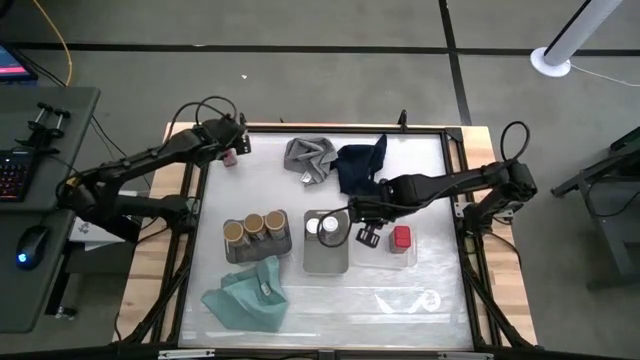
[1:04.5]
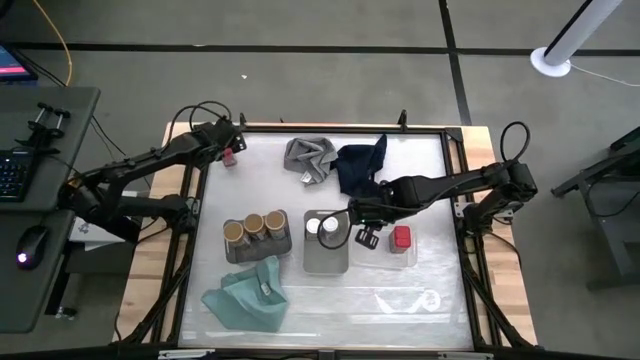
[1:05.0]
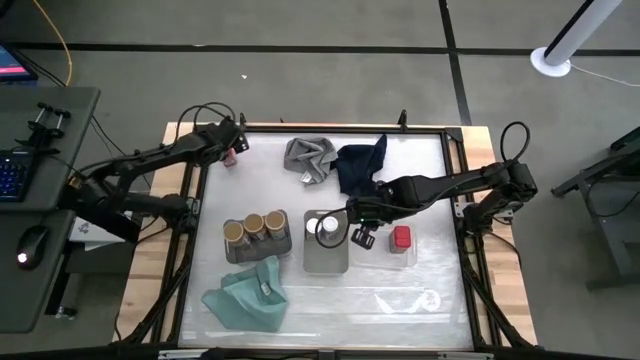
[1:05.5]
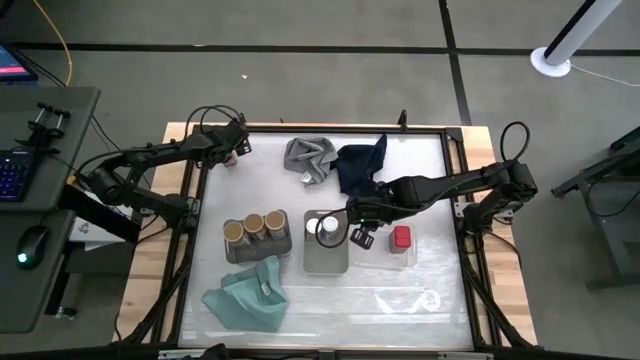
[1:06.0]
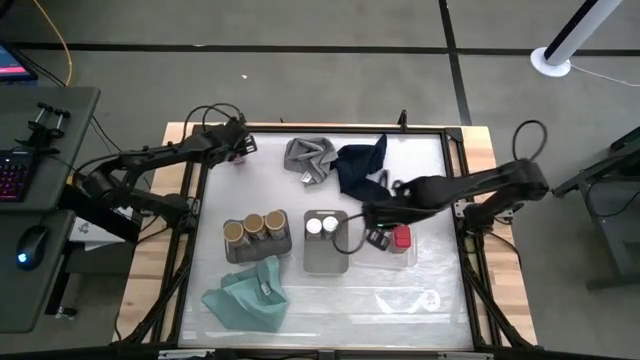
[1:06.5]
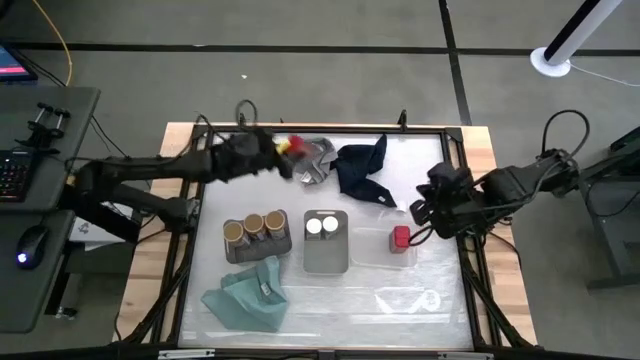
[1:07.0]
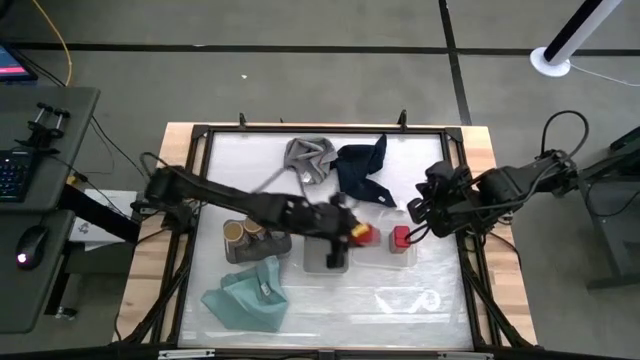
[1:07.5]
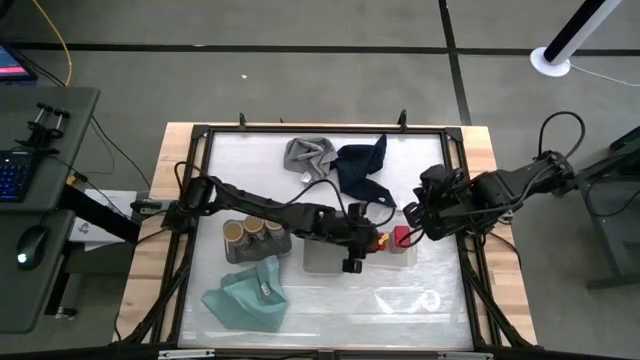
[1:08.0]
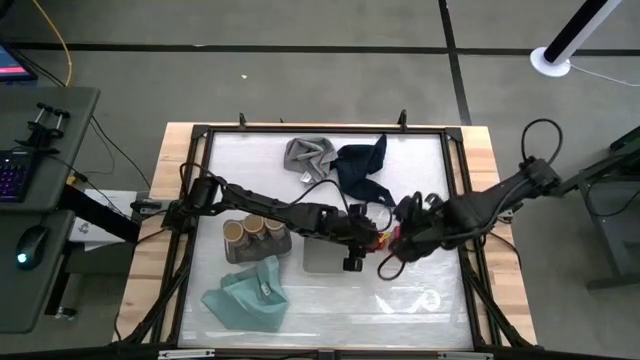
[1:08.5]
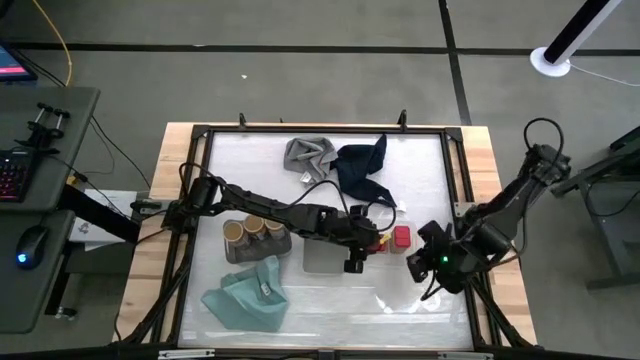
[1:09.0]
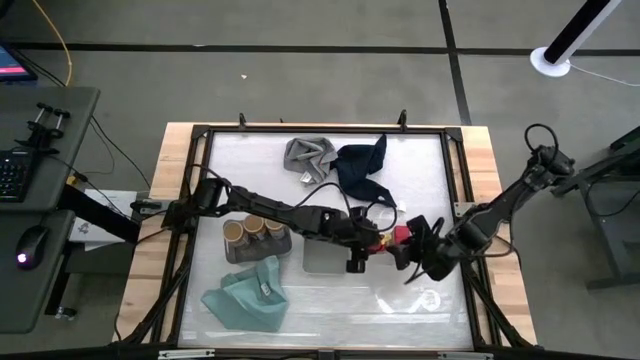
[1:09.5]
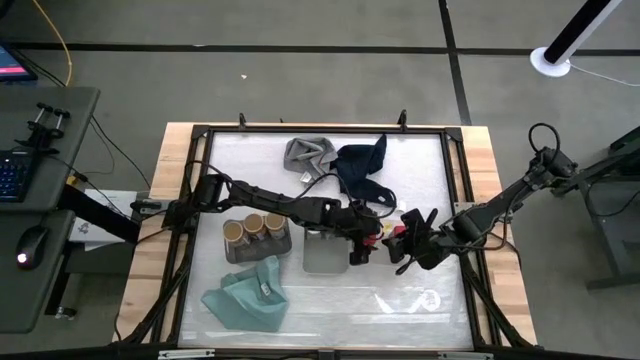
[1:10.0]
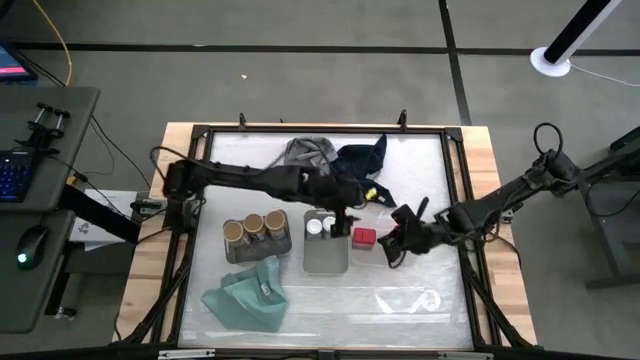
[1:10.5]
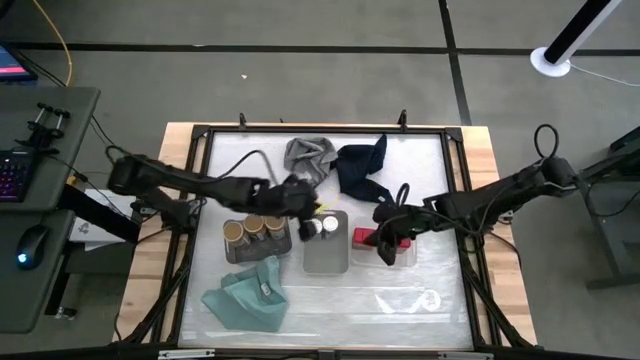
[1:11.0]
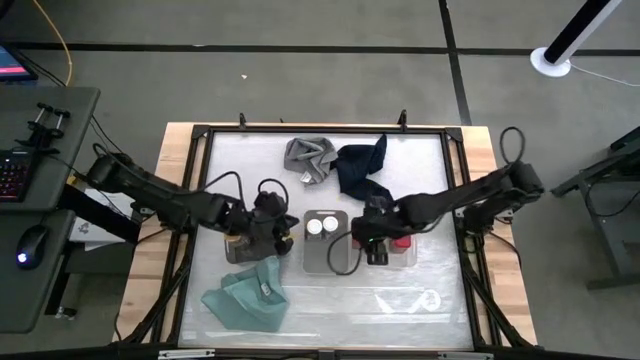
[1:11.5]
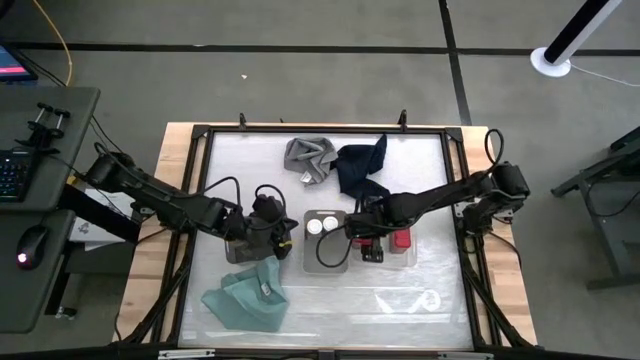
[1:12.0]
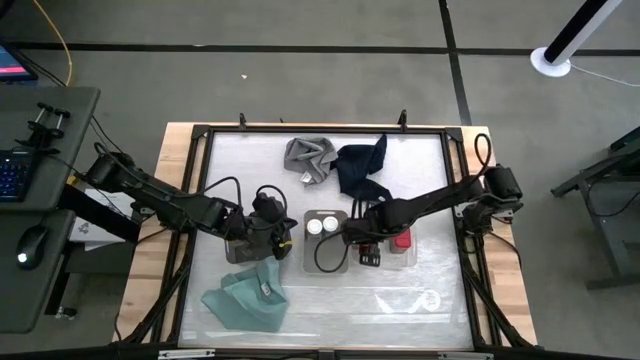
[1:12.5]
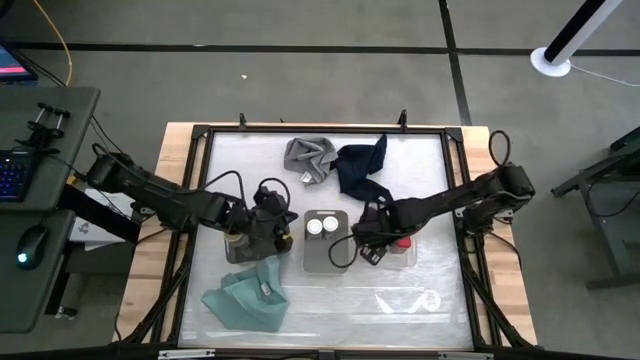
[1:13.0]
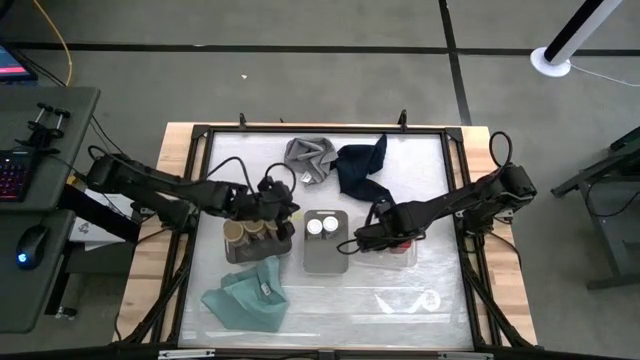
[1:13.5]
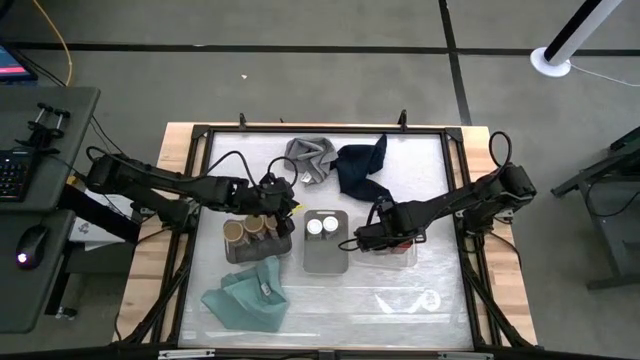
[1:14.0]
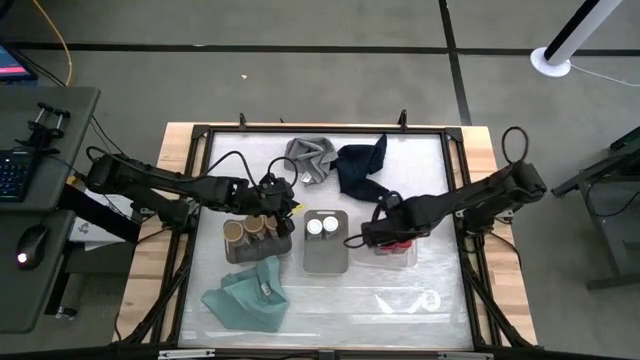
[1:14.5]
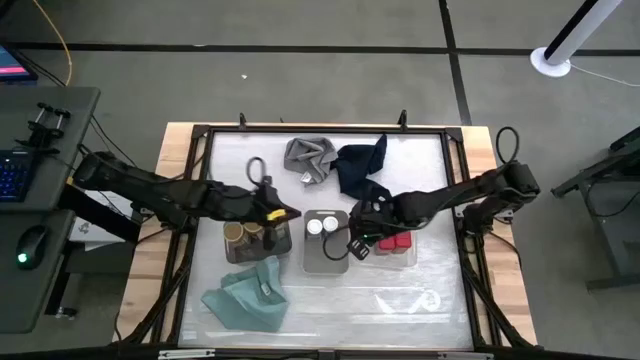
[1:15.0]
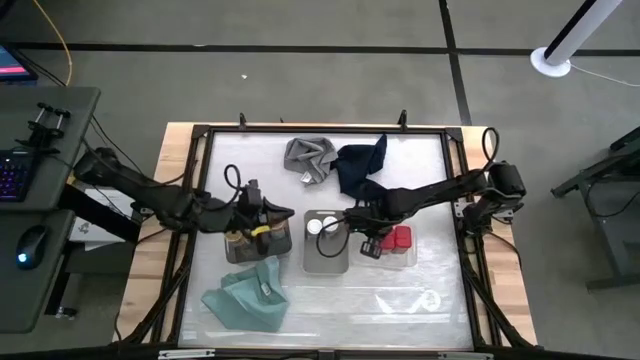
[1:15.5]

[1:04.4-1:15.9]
Task: Sort spices by type
Put the red seasoning can into the transparent bin

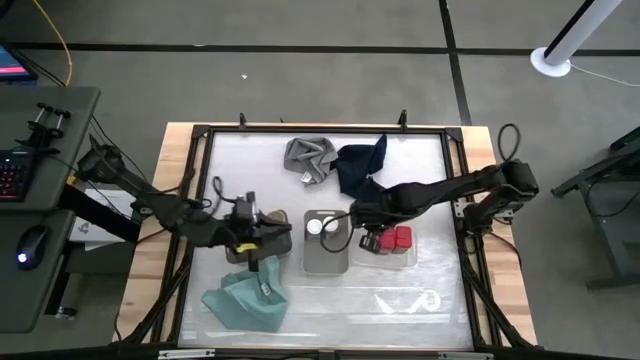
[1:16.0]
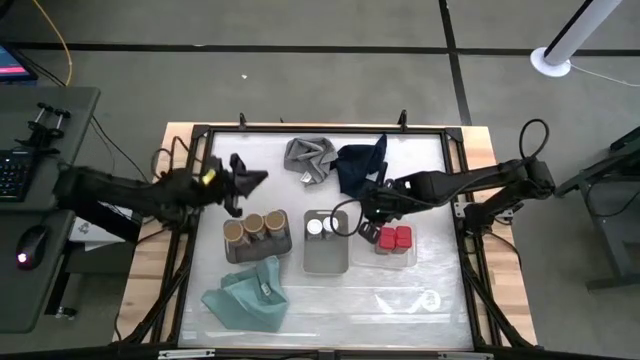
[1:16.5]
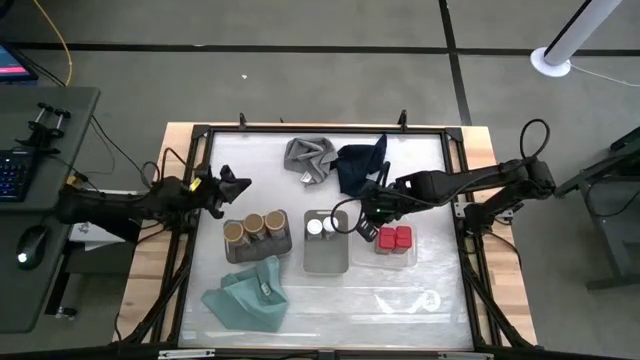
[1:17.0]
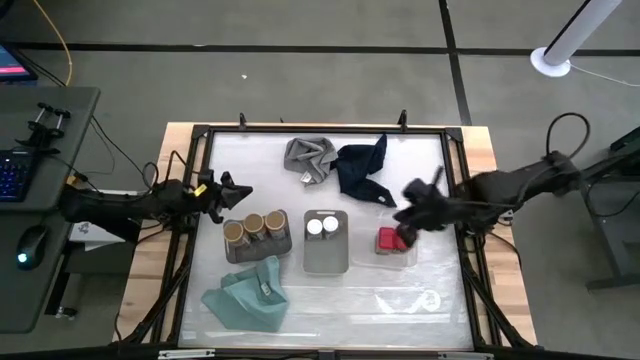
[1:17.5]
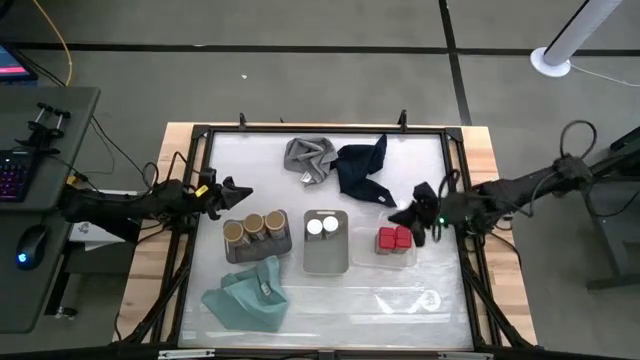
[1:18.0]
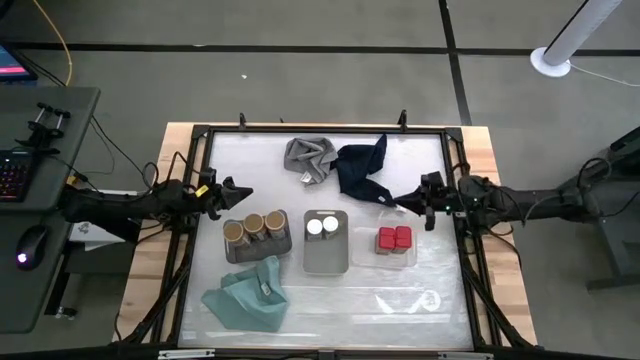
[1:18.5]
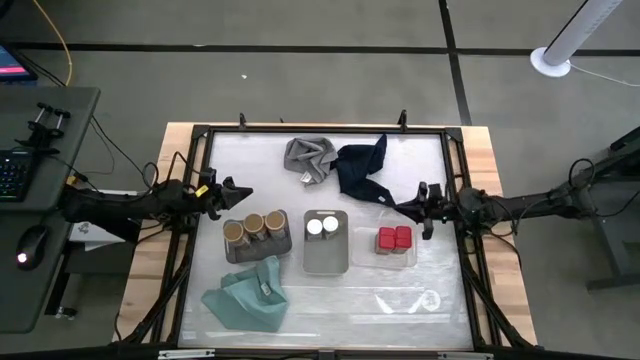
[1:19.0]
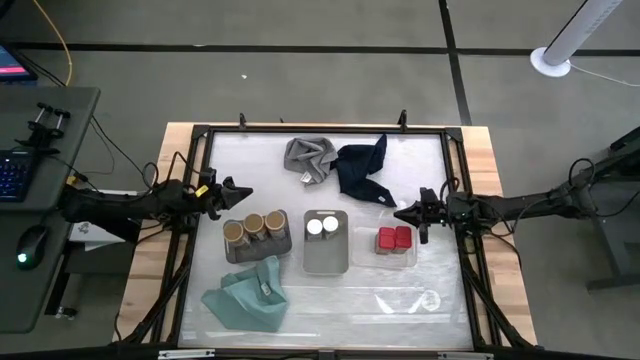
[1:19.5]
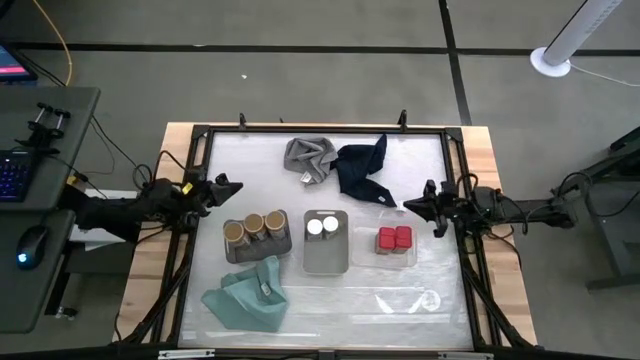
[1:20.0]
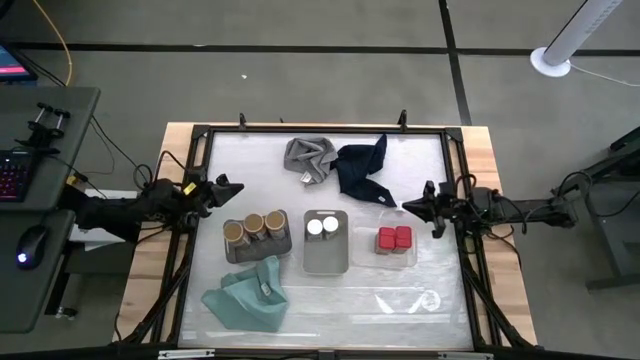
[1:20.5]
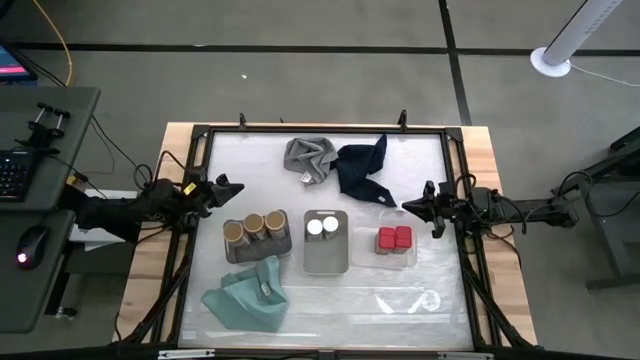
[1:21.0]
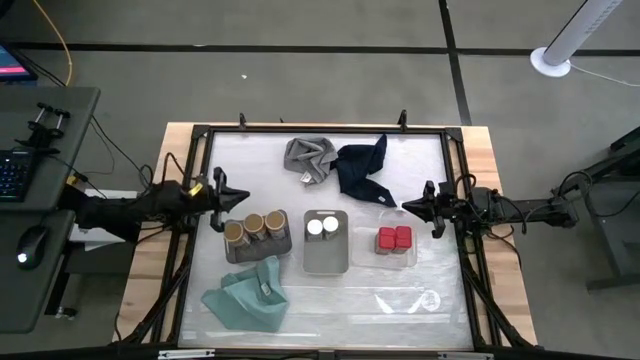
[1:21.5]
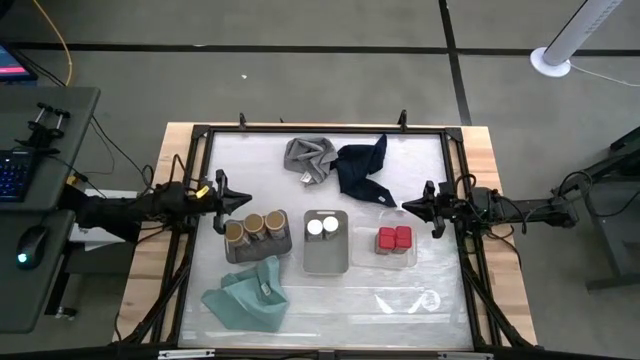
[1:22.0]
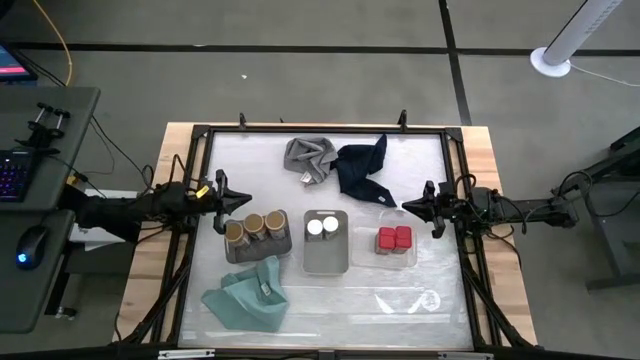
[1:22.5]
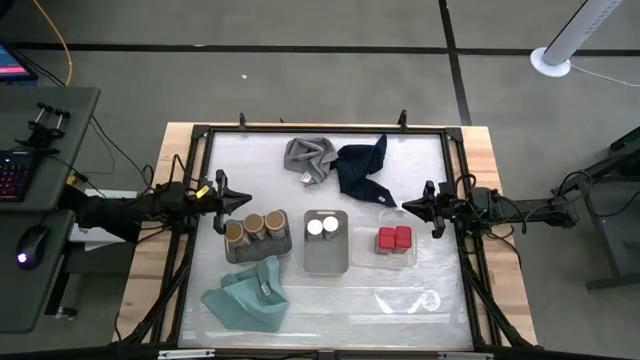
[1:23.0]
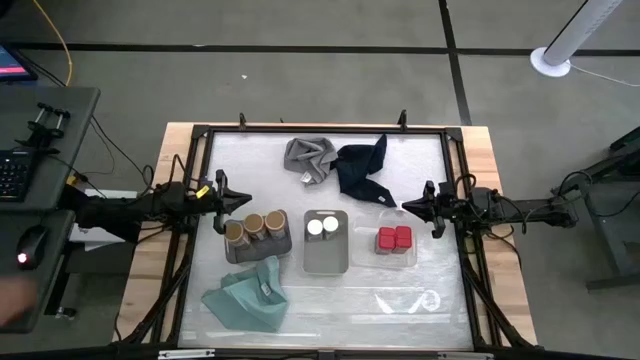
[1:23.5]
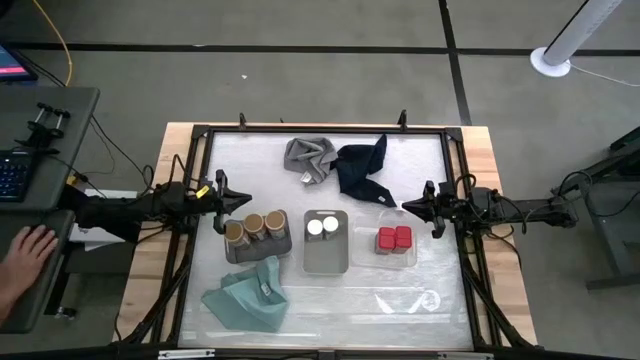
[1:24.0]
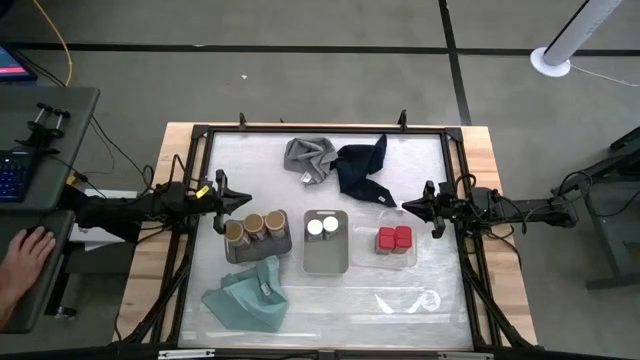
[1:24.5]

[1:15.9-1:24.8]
Return to Home Position

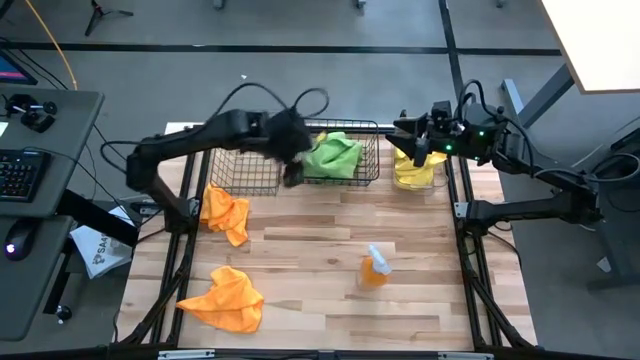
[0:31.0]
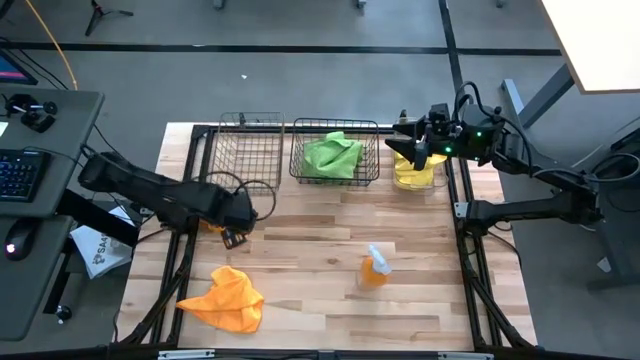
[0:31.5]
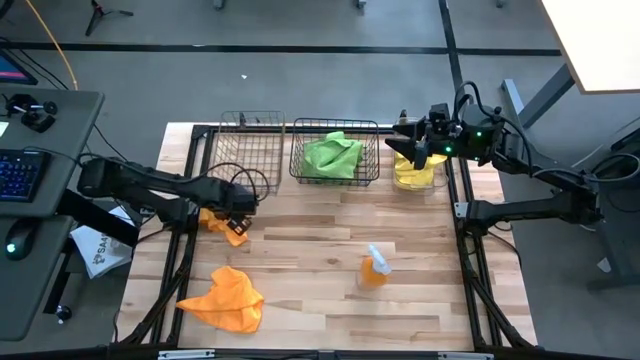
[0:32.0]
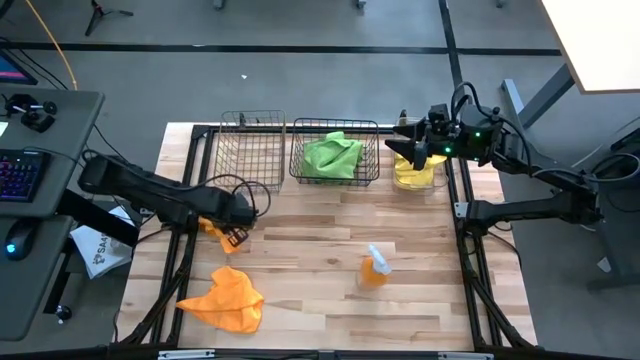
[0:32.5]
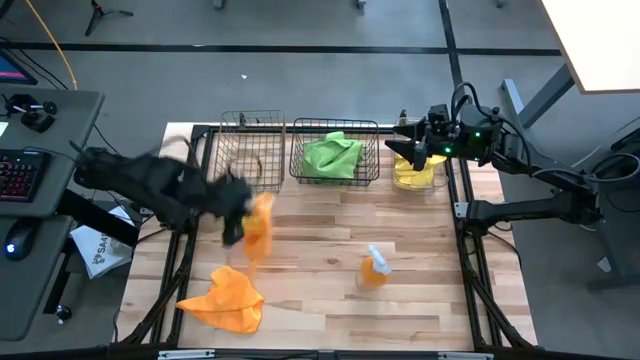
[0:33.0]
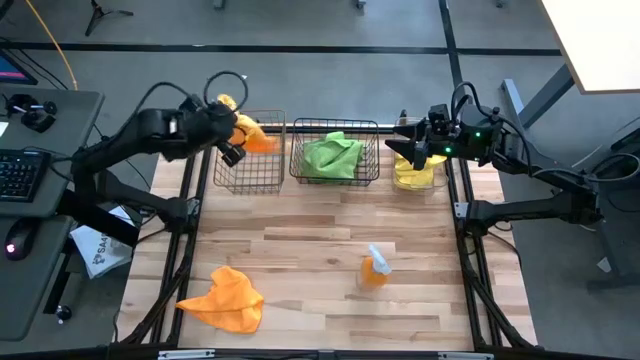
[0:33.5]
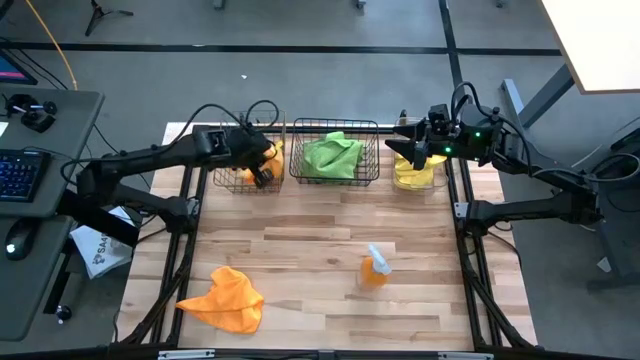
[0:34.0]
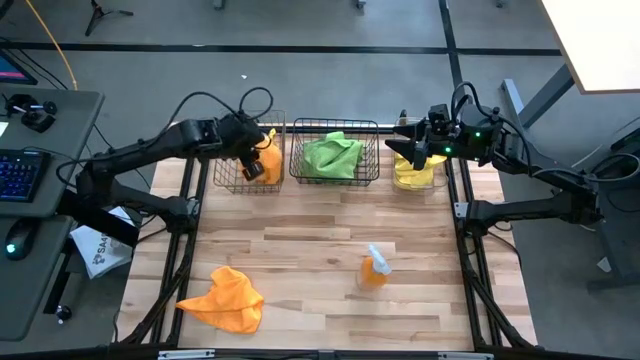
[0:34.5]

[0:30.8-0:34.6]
Task: Sort microfiber towel by color & place in baskets
Put the top orange microfiber towel into the gold wire basket
